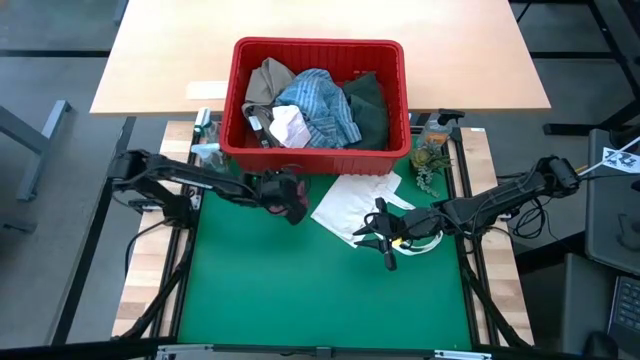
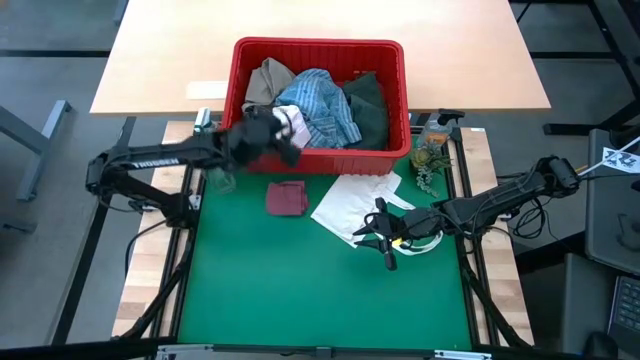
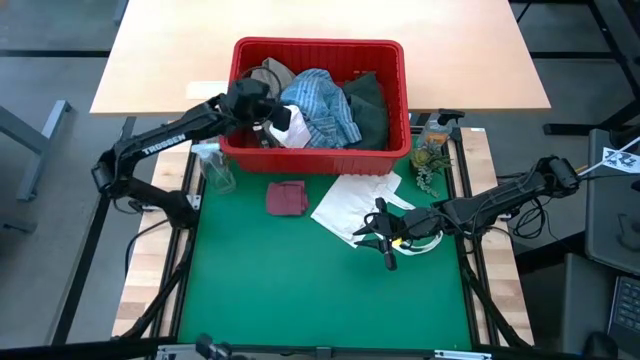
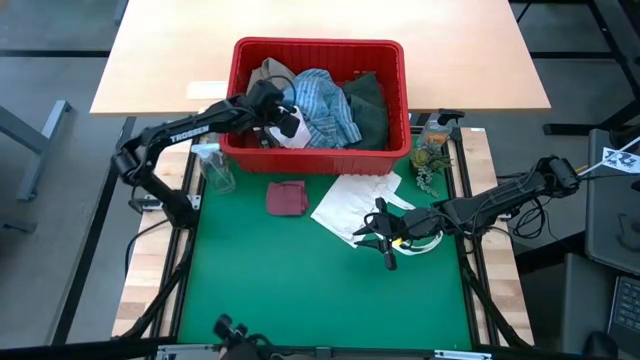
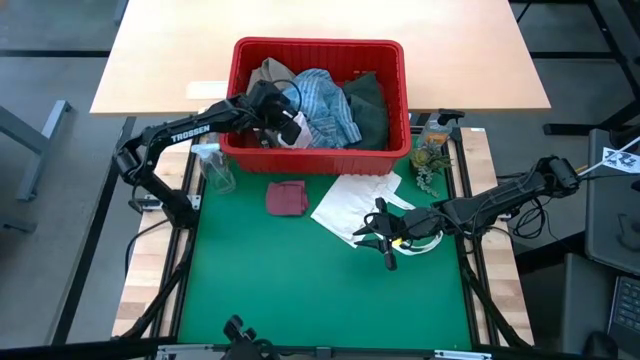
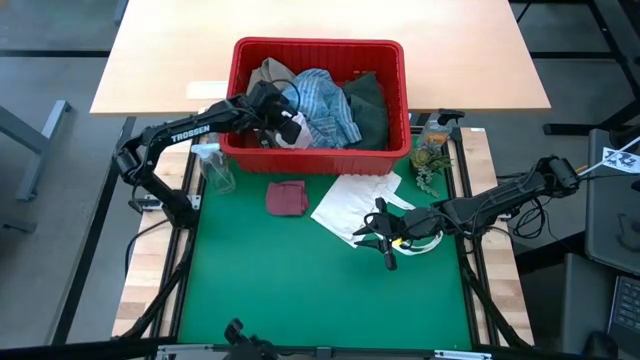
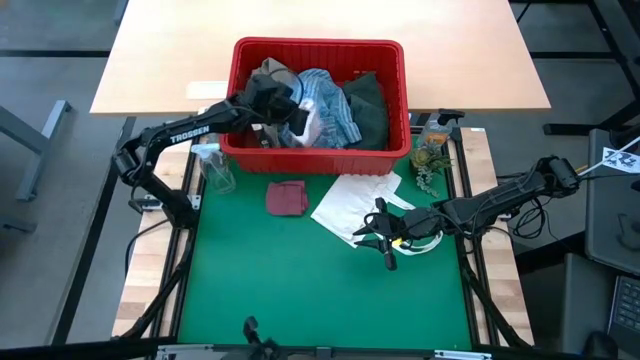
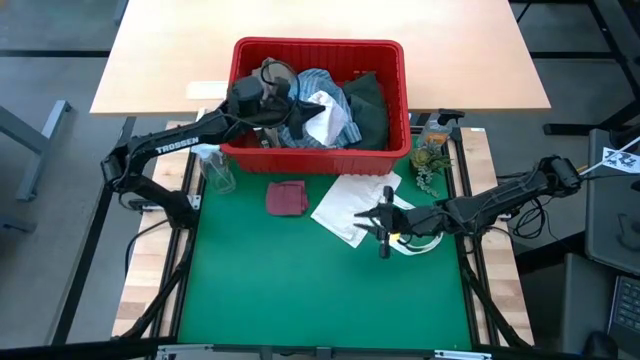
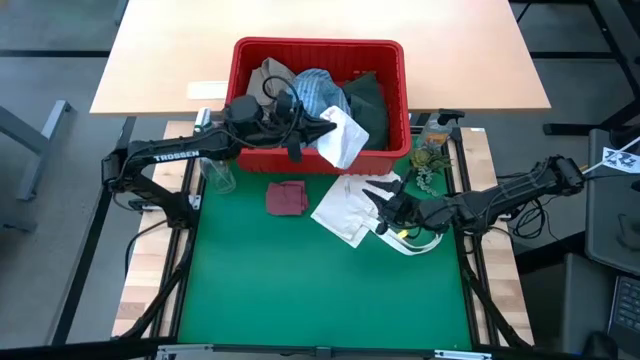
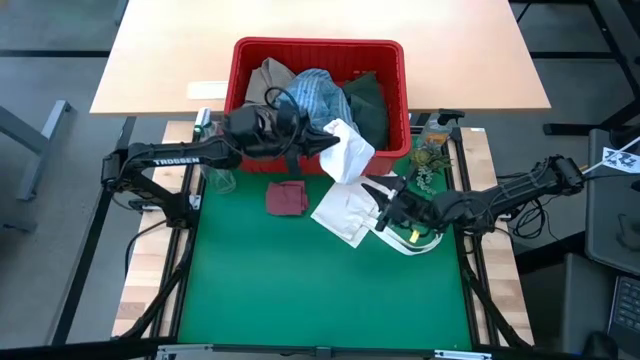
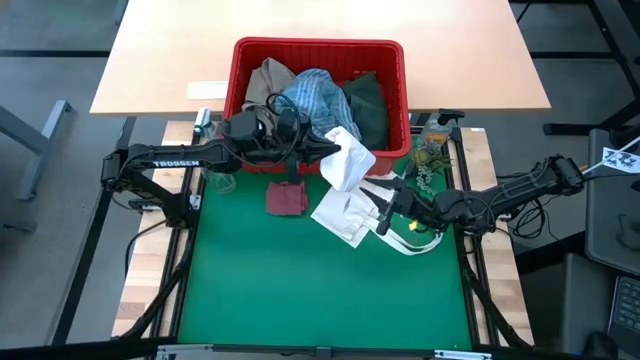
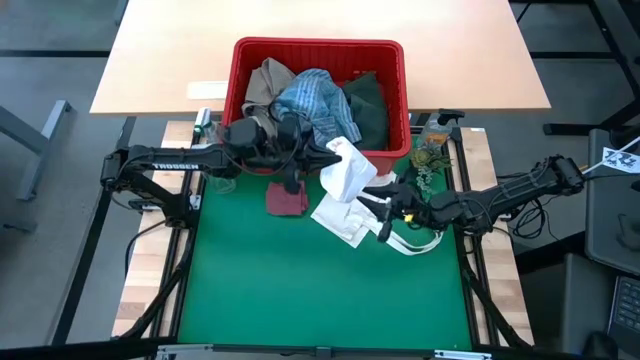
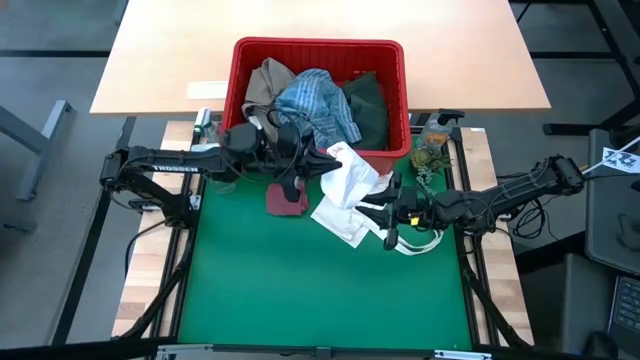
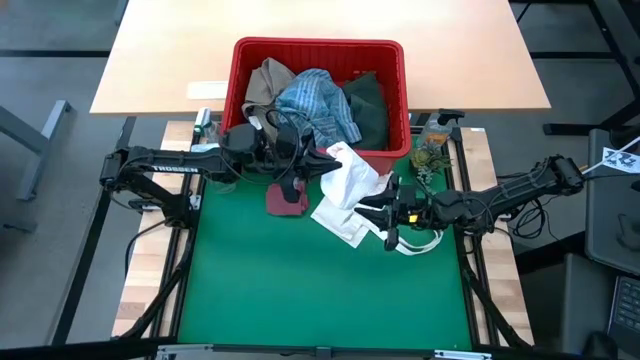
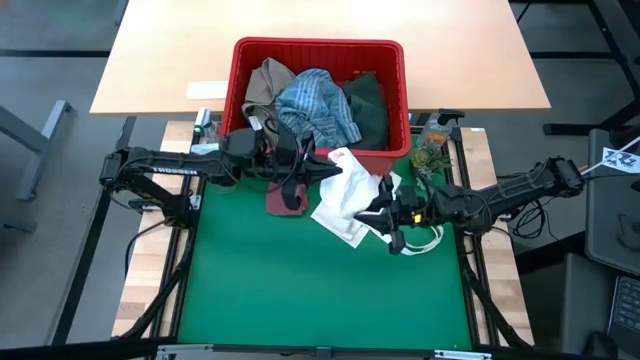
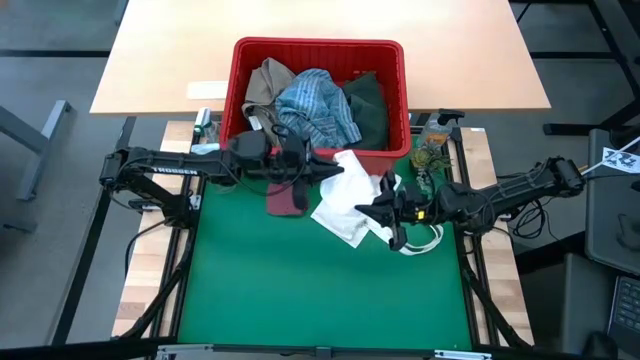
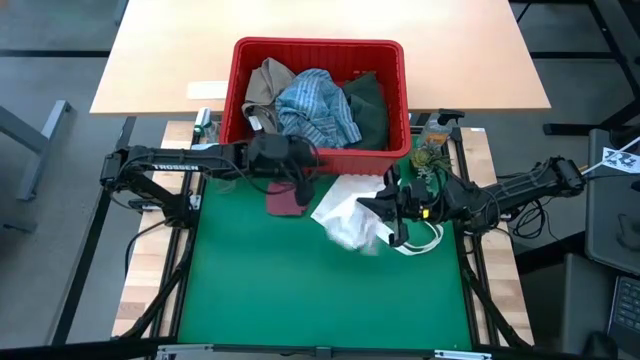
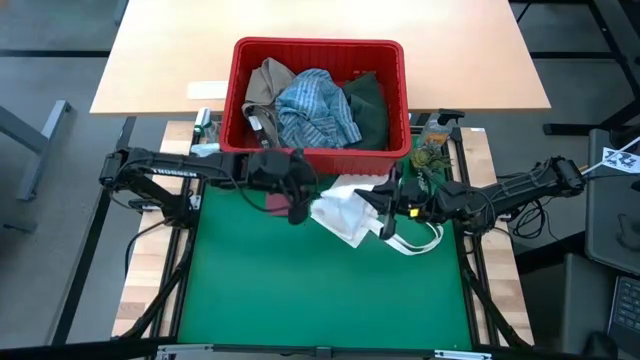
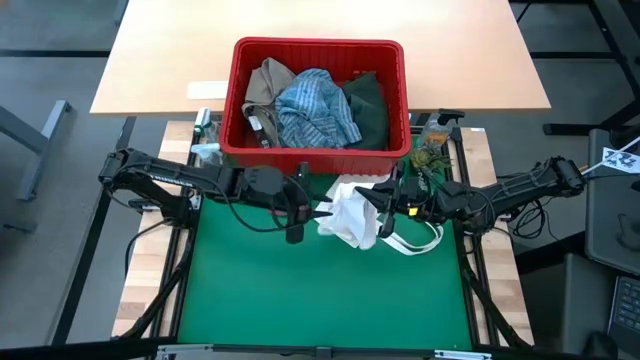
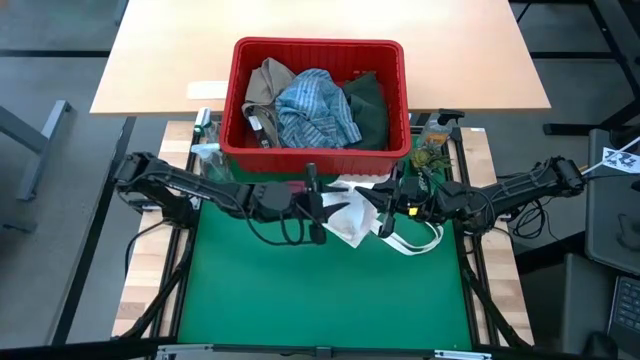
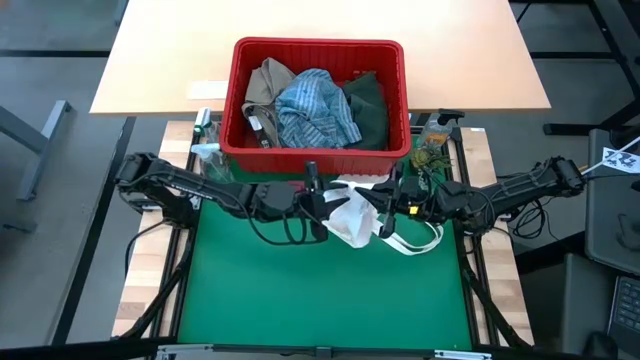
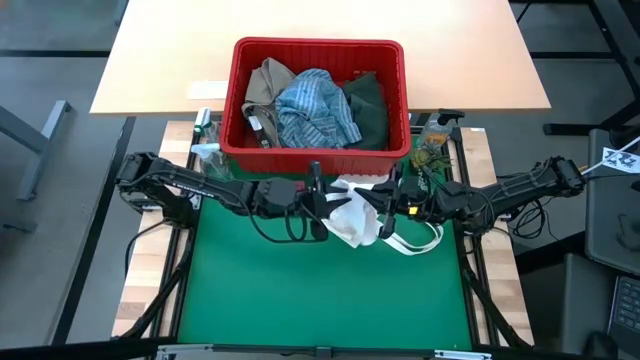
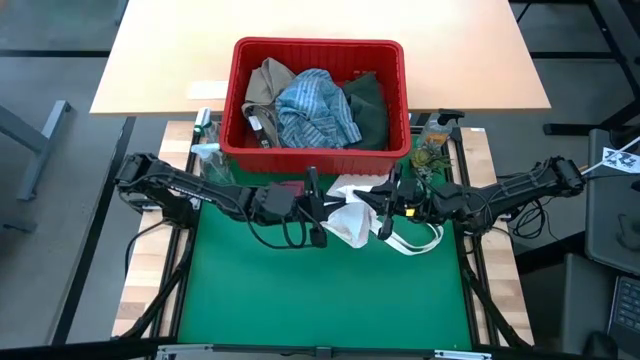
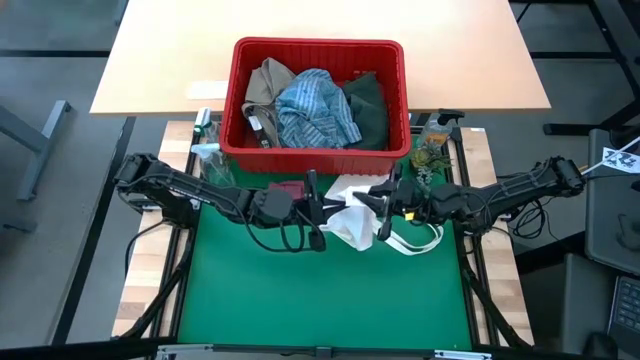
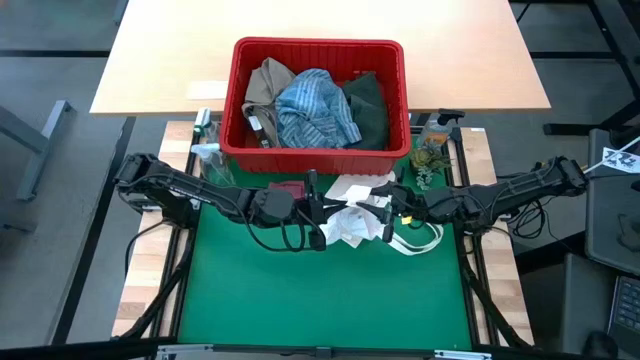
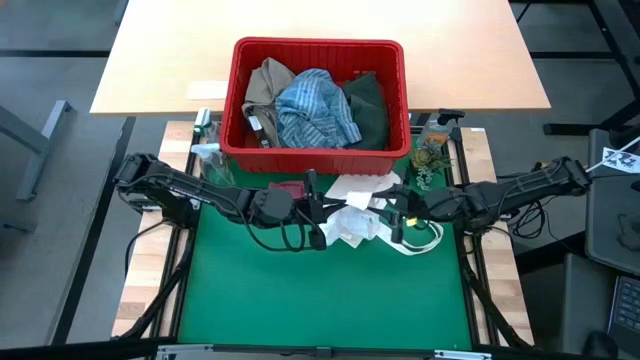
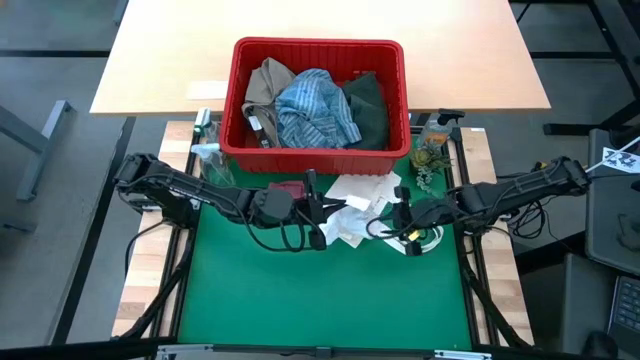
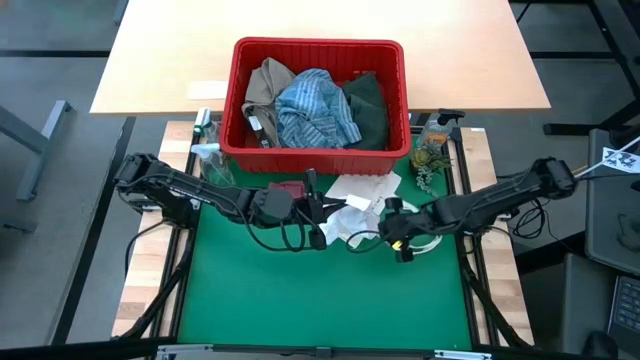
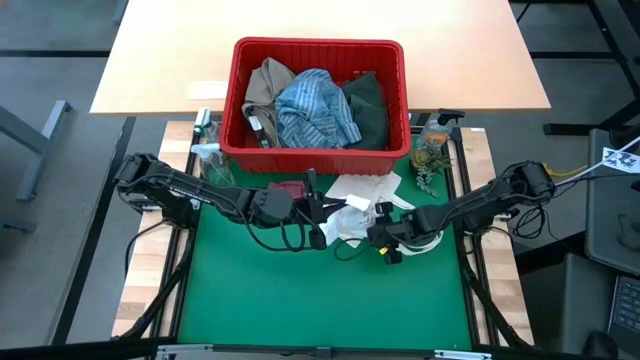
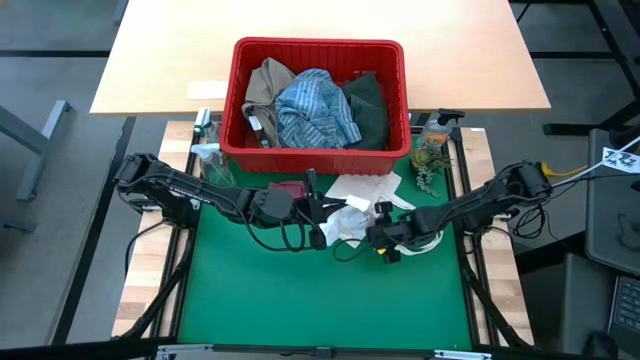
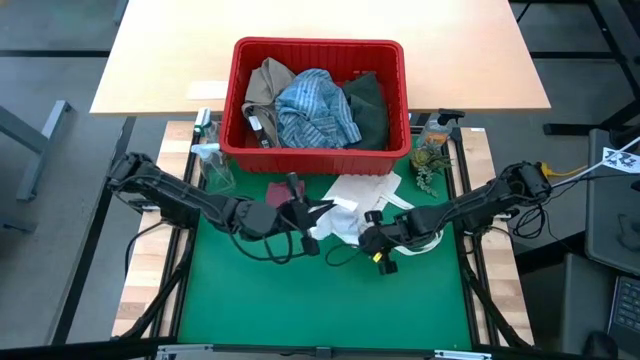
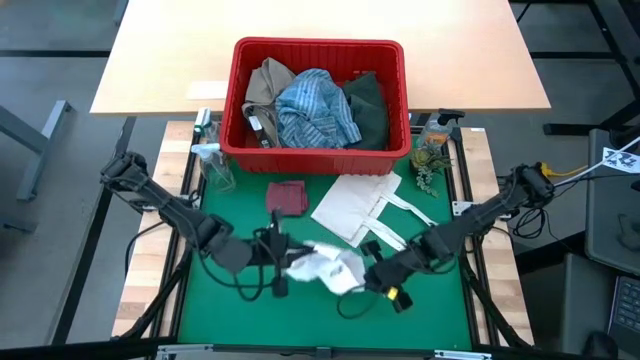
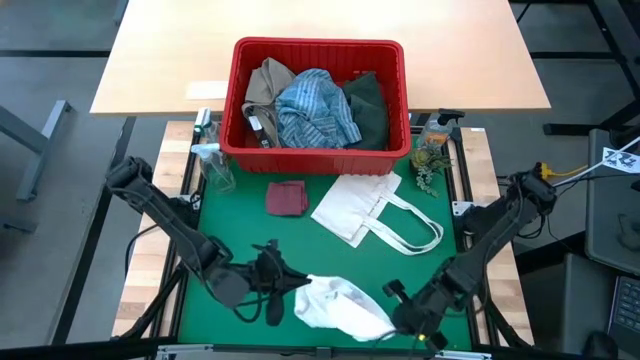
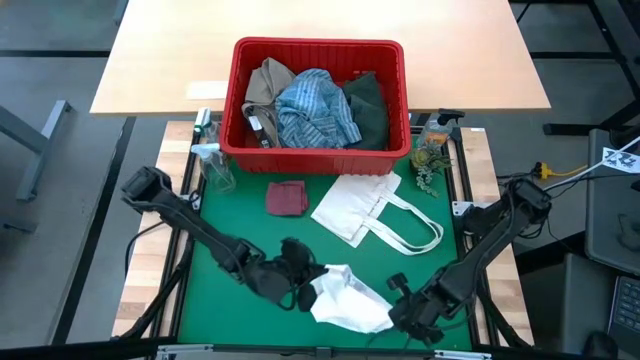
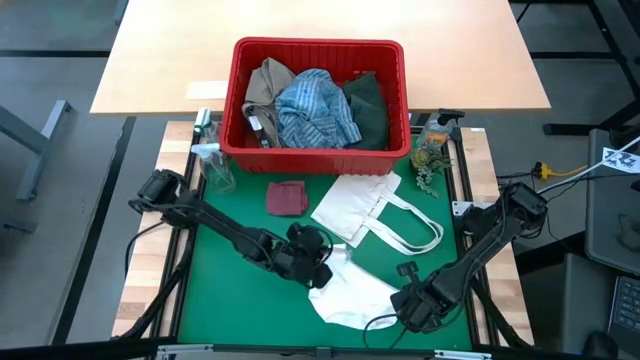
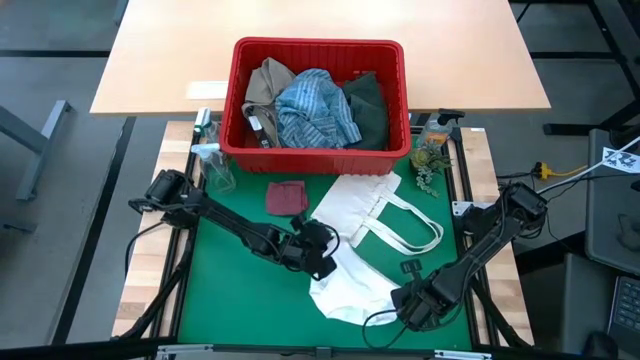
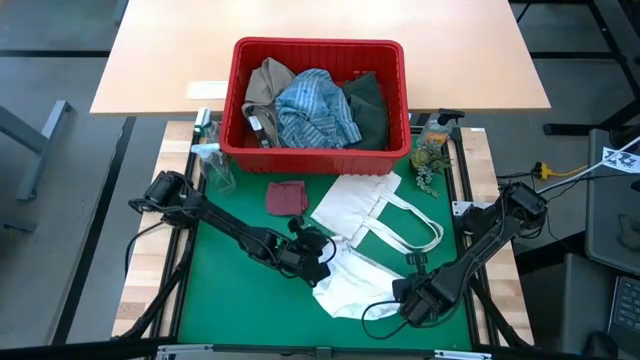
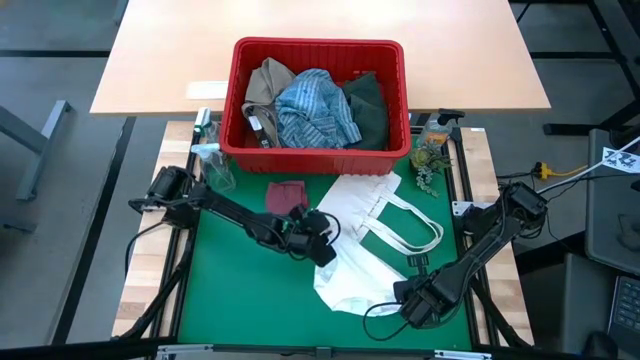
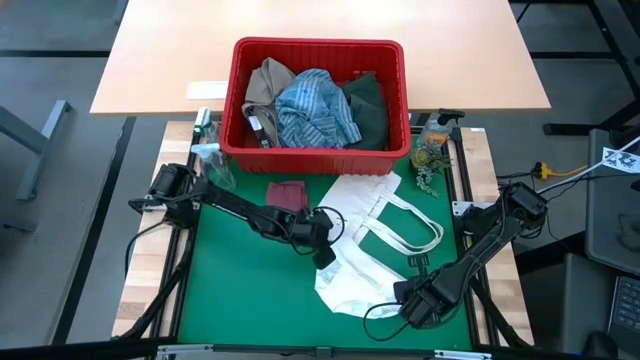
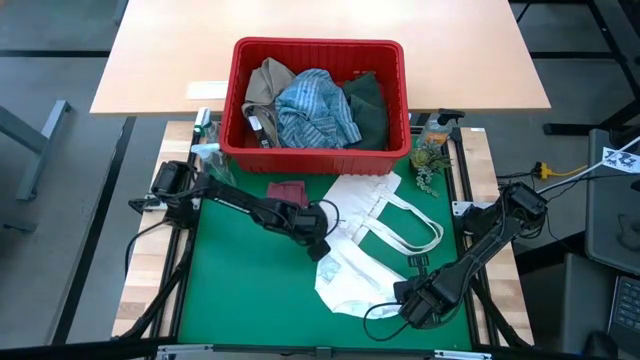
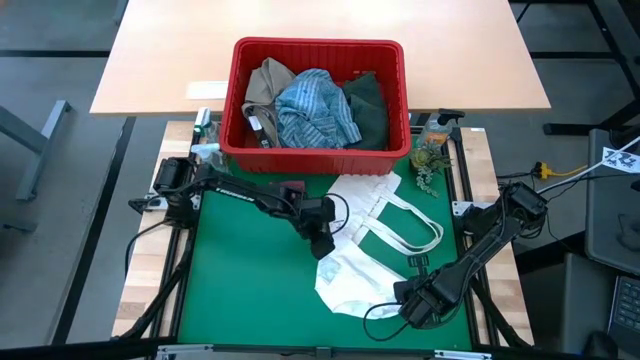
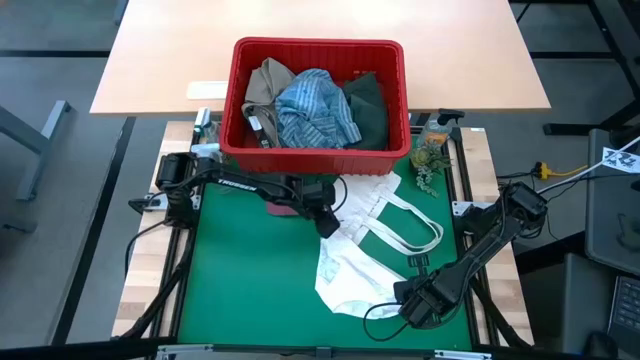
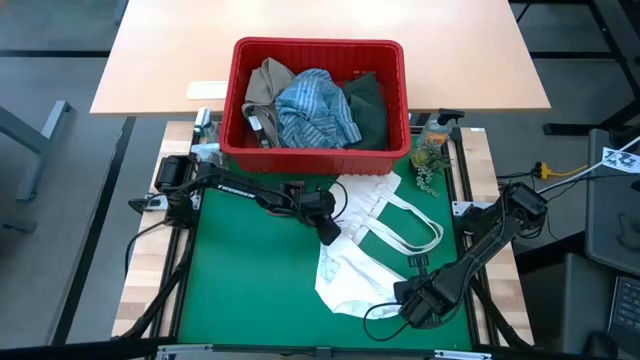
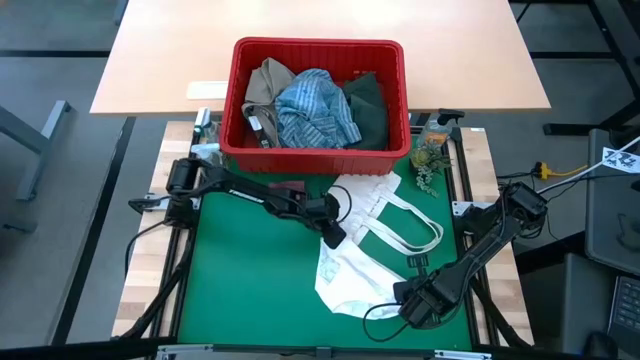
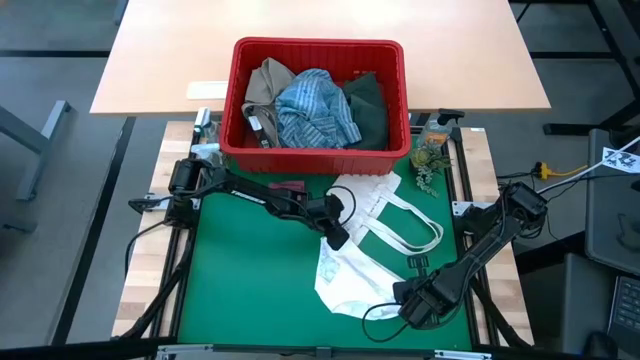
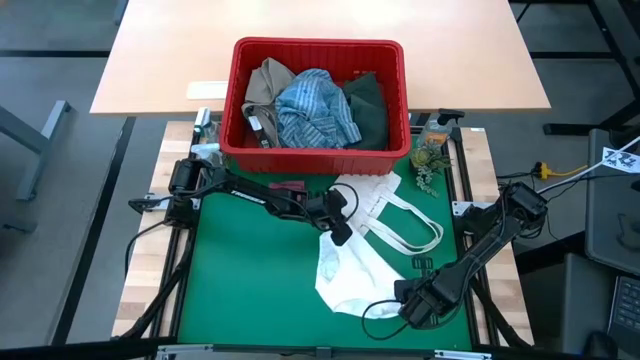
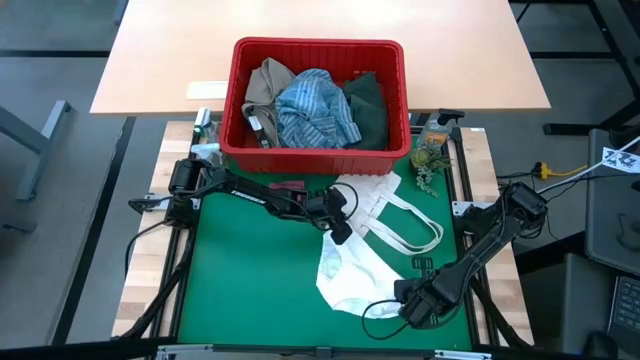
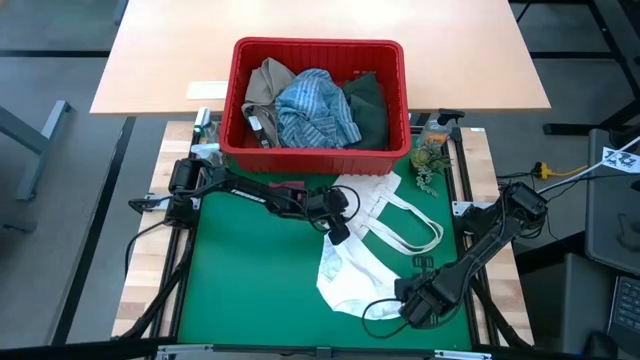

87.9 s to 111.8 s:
Task: Fold Laundry from Bin
Remove the white underwear from the red bin
